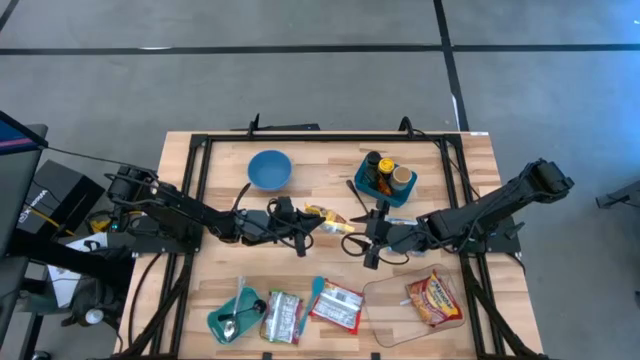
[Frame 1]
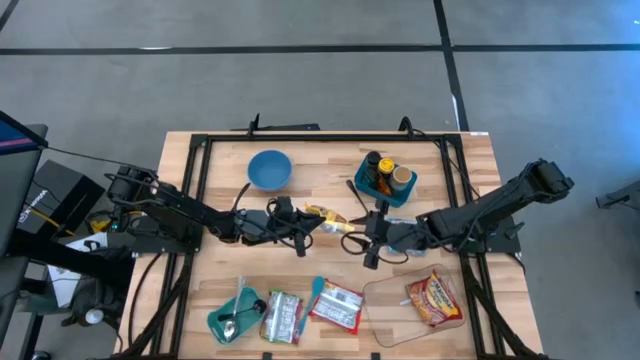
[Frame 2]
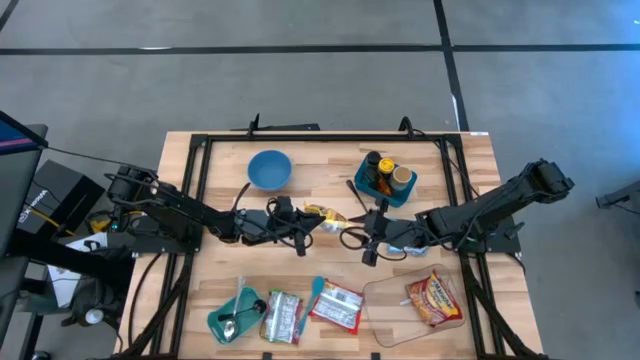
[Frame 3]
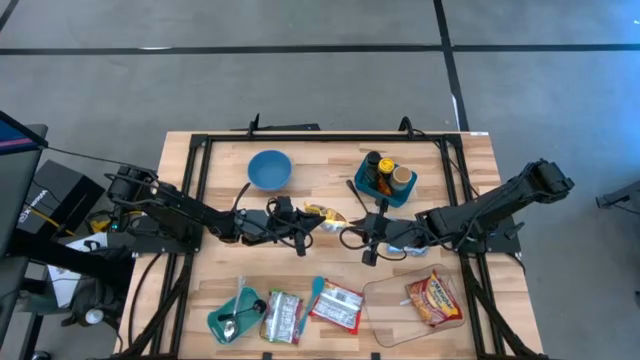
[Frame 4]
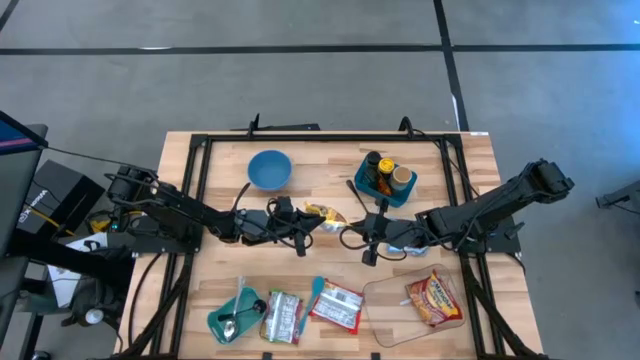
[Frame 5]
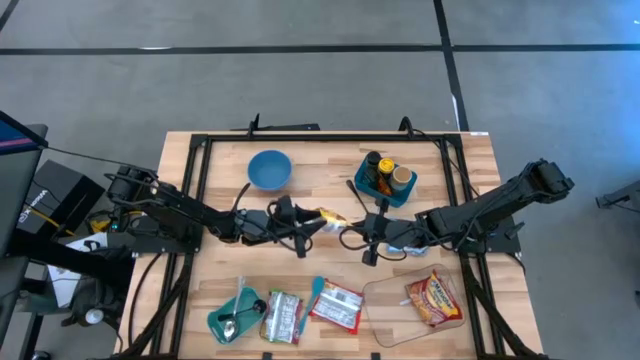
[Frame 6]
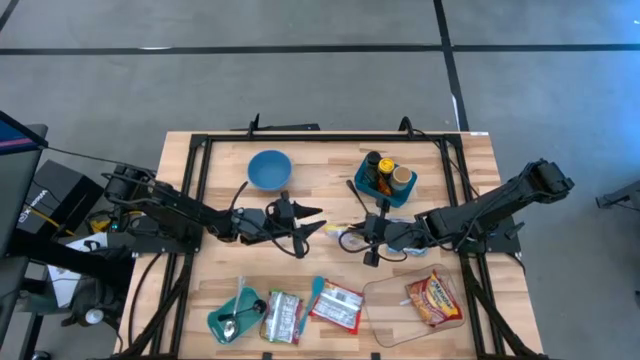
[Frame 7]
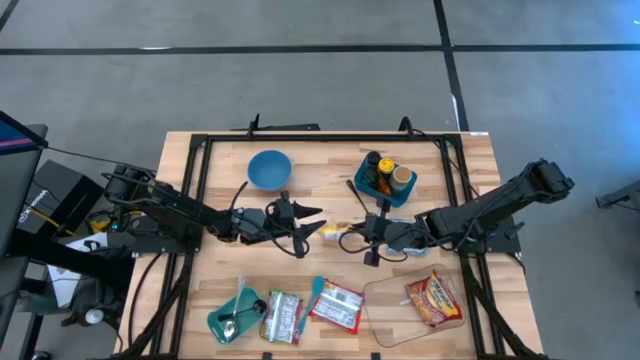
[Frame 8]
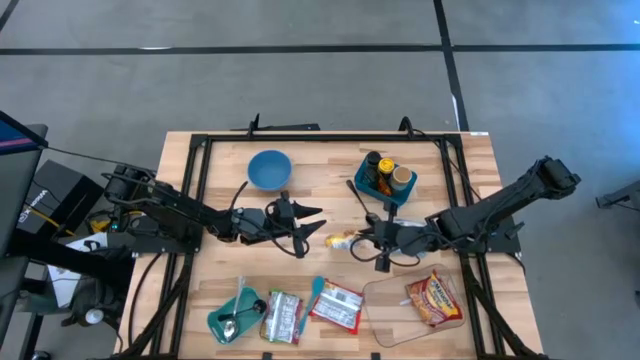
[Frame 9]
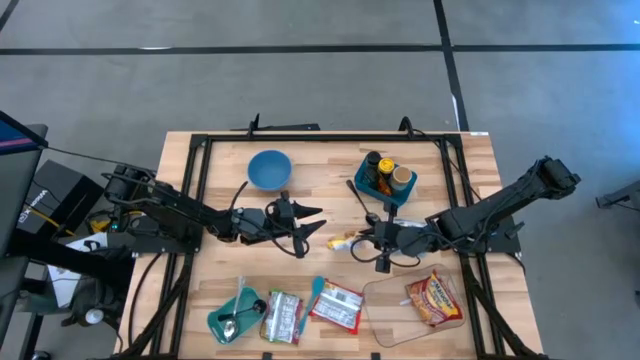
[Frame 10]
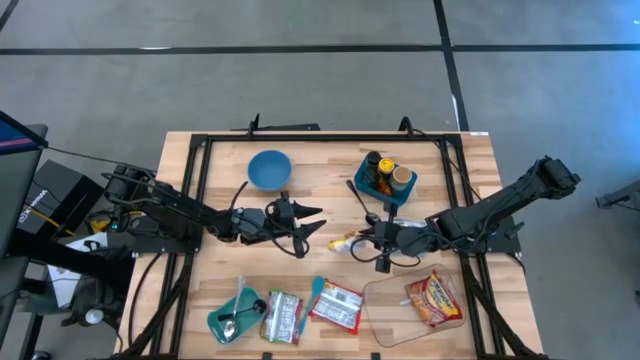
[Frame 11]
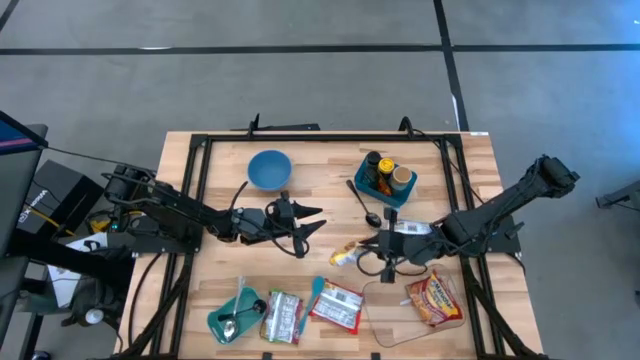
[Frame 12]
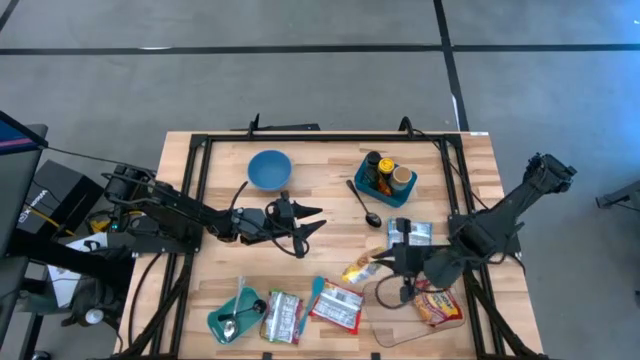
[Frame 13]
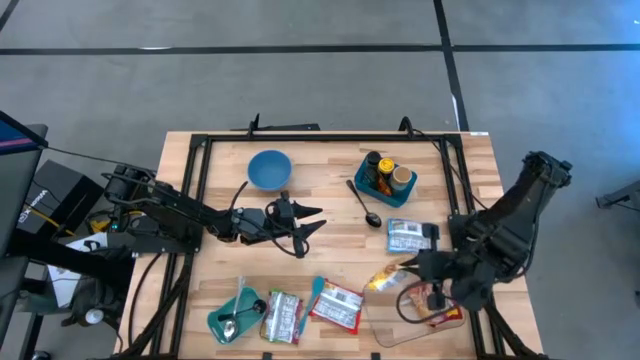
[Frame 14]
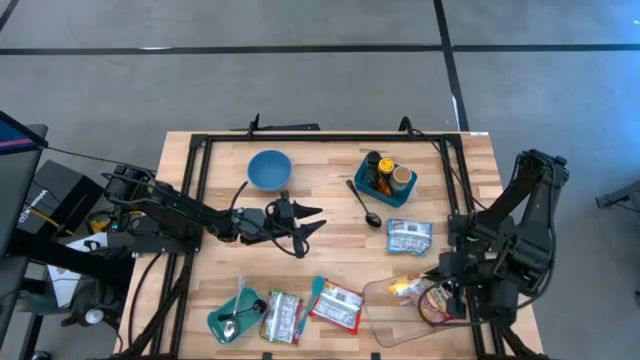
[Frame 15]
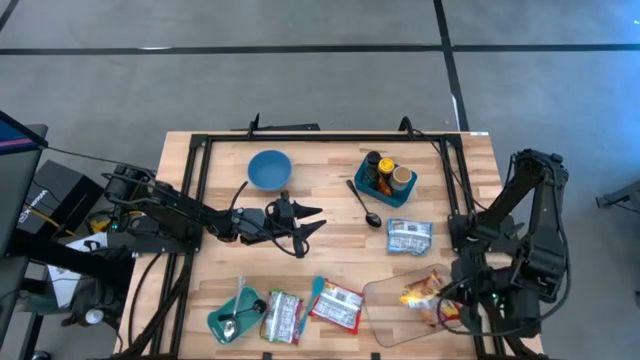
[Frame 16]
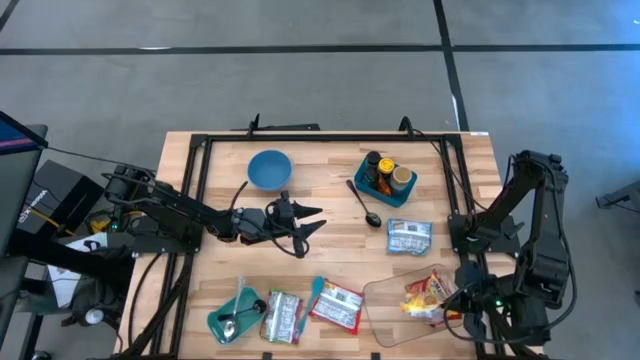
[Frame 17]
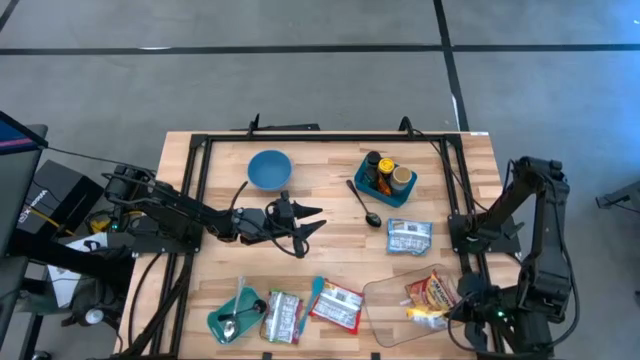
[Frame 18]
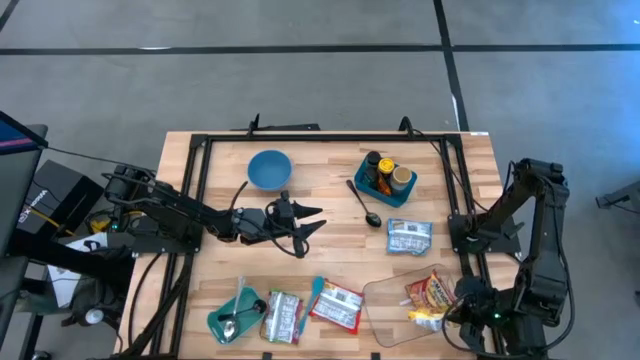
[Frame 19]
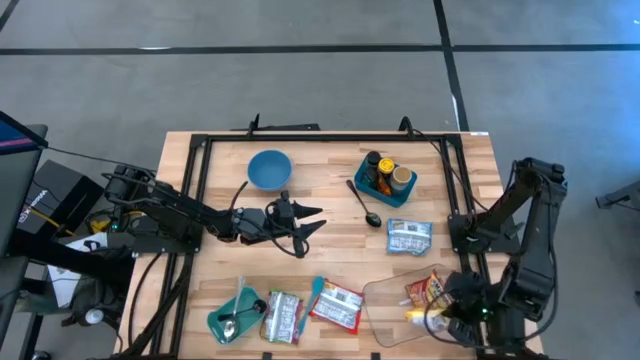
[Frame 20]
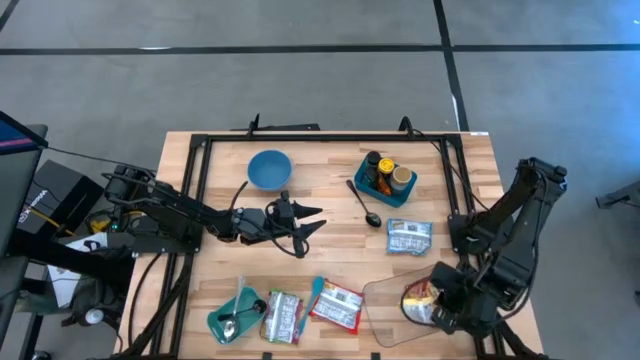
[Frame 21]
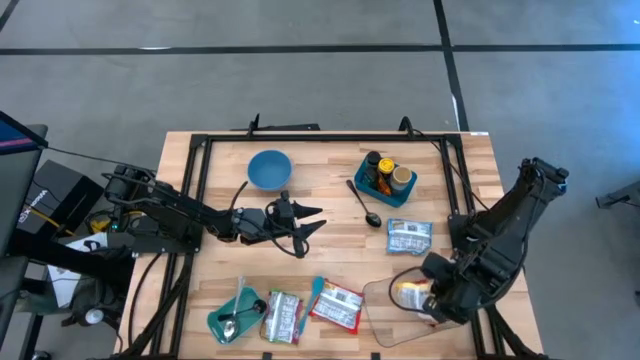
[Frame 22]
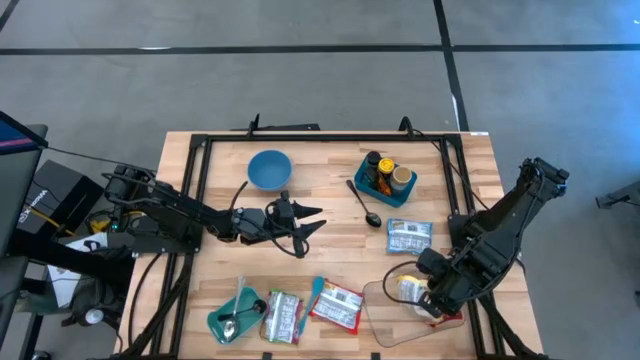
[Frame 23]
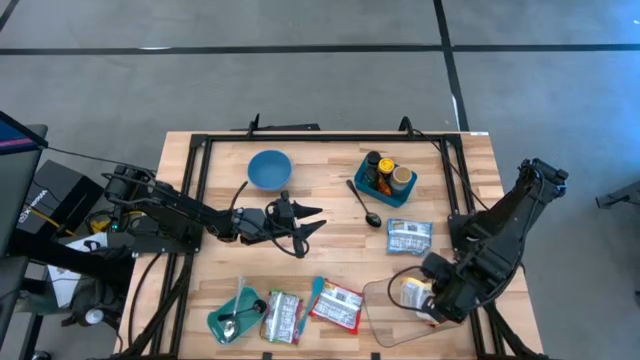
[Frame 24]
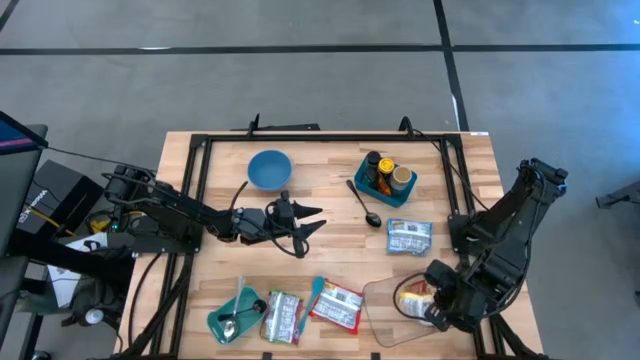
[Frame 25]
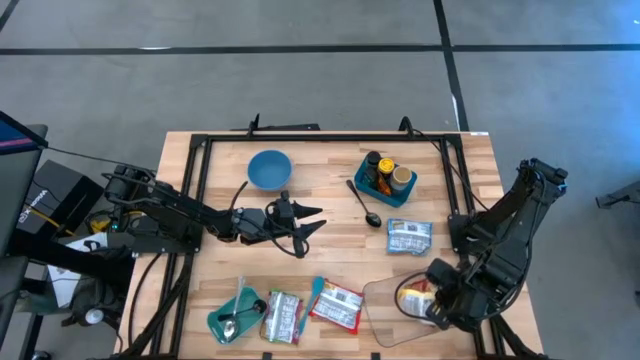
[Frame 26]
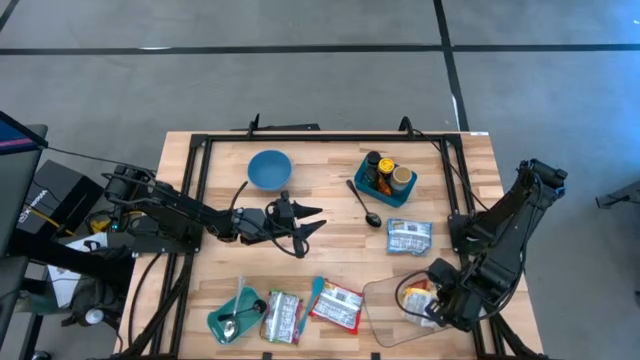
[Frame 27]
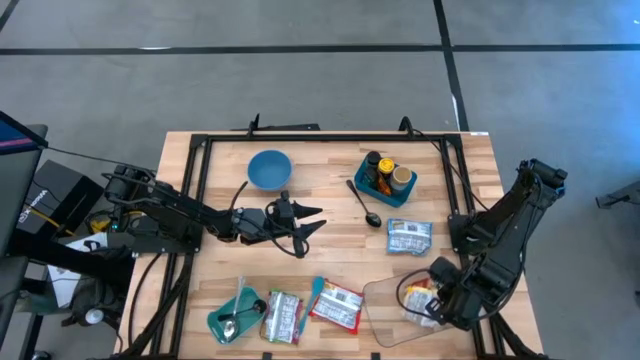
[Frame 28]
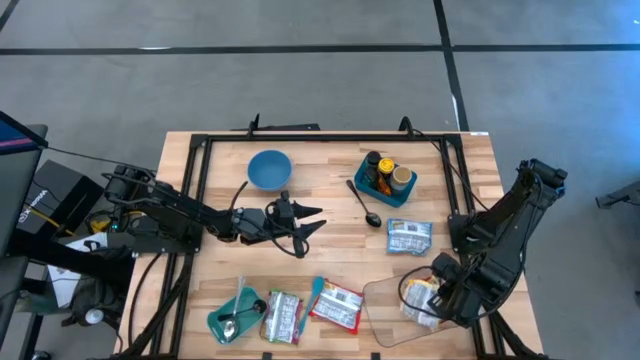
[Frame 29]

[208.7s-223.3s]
Task: Pick & Place Food Item
Put the yellow noodle pack into the transparent bin

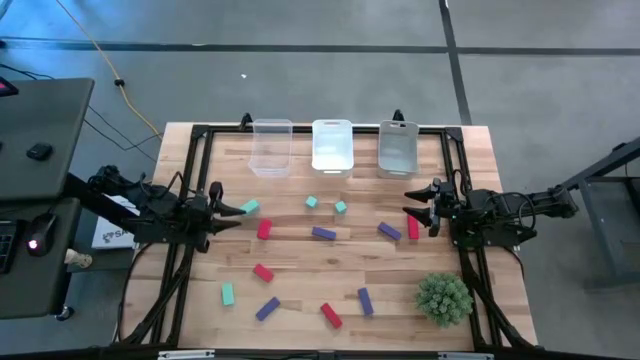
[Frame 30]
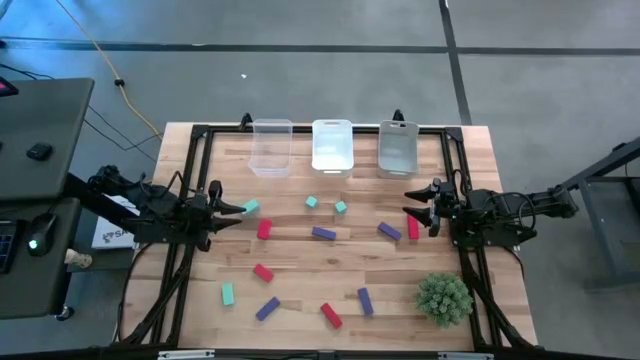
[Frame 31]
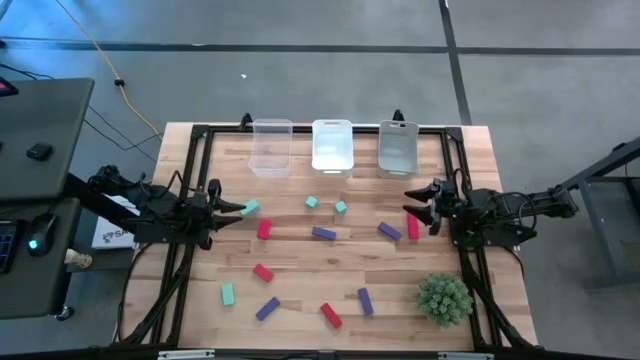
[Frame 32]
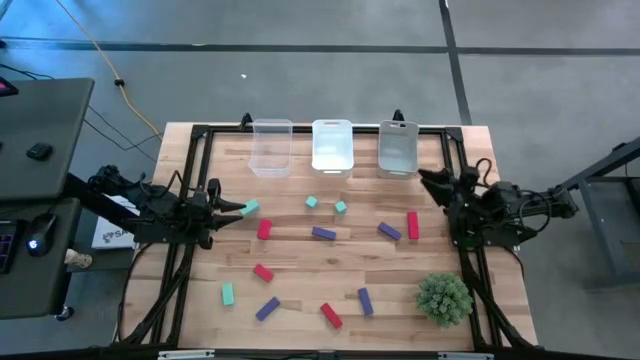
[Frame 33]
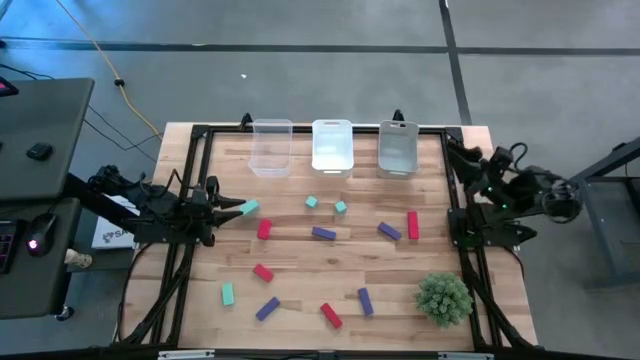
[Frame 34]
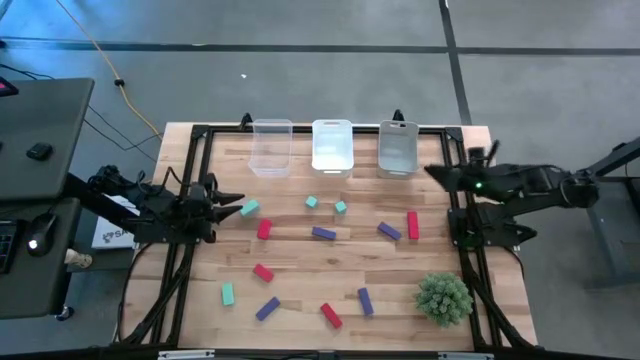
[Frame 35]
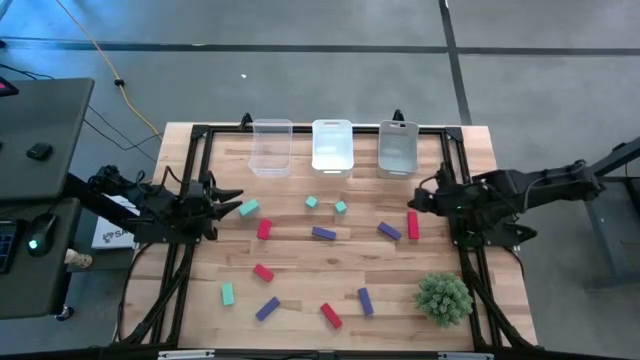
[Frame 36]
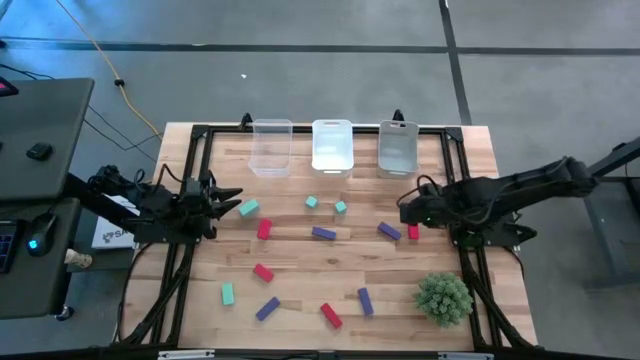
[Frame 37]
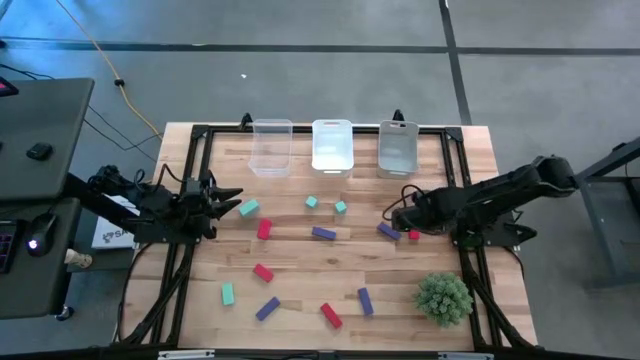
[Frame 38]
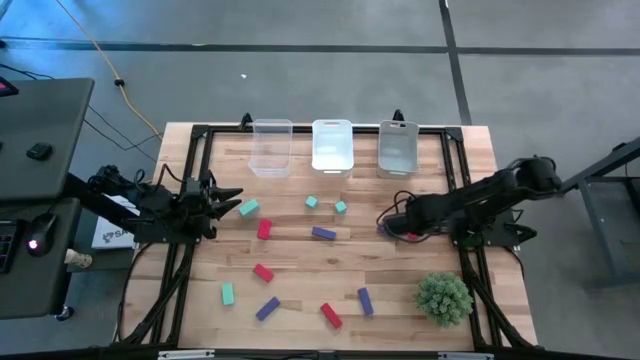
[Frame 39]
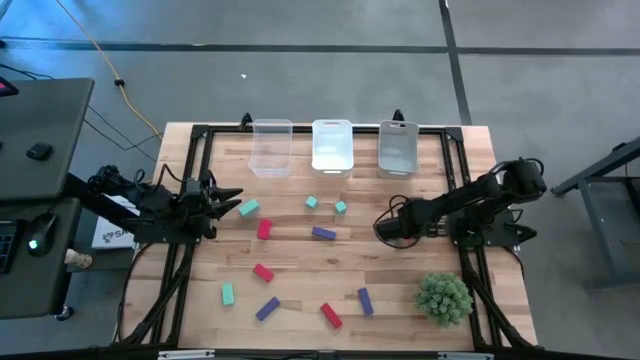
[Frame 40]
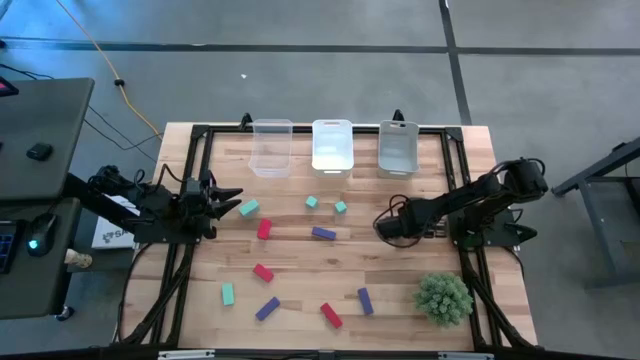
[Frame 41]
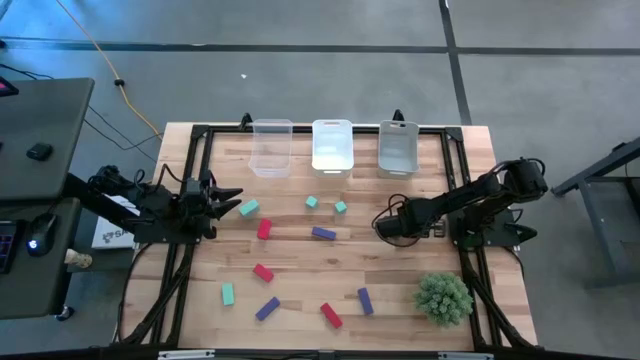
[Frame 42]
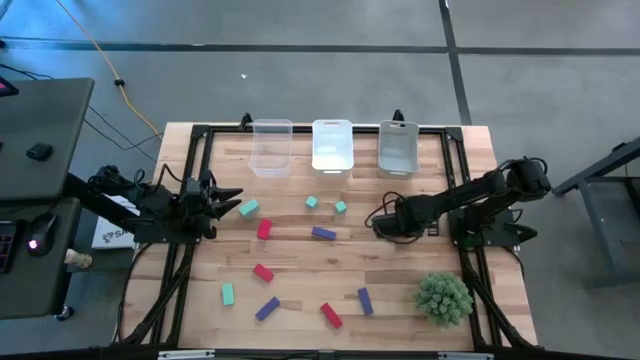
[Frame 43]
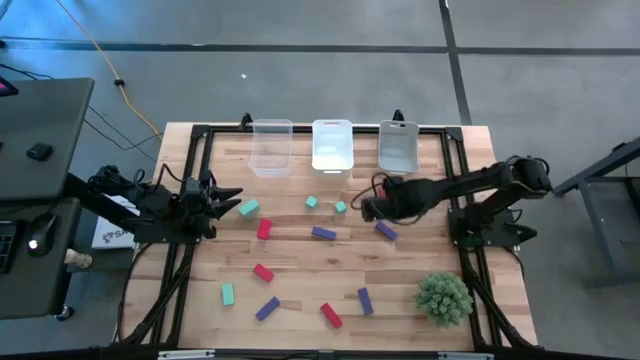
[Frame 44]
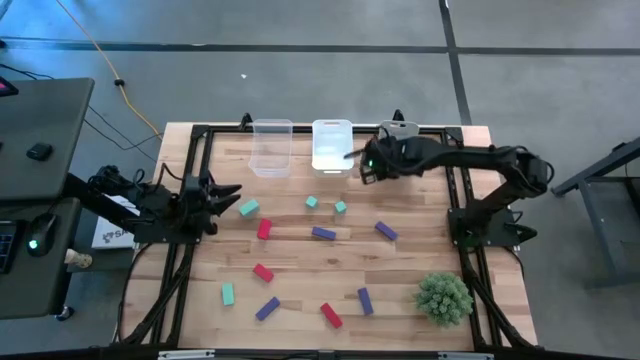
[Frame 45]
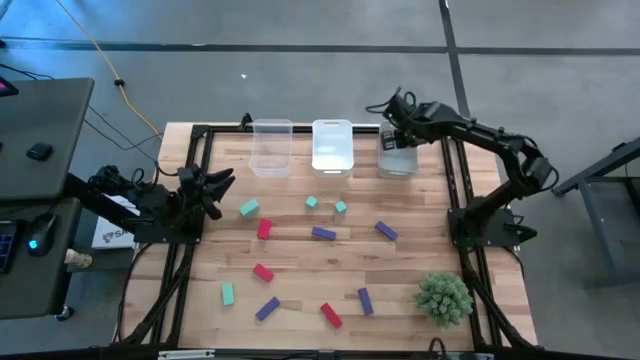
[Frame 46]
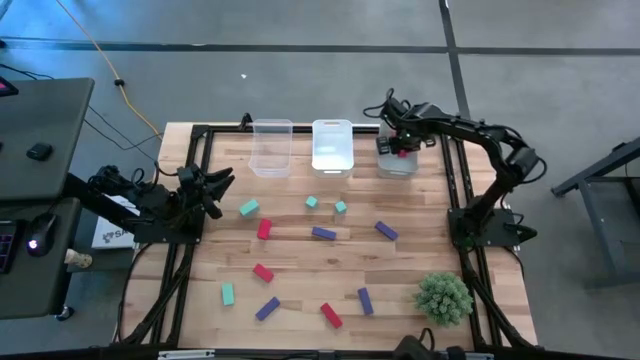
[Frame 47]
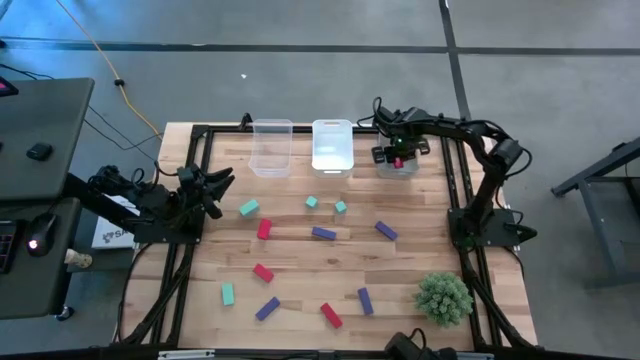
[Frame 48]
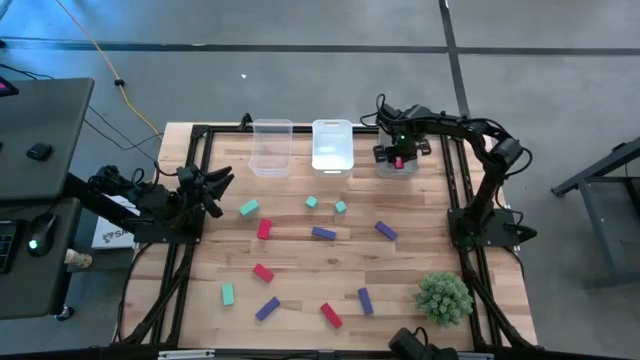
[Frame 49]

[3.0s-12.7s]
Task: Sort & place blocks by color
Put the red block into the gray bin
